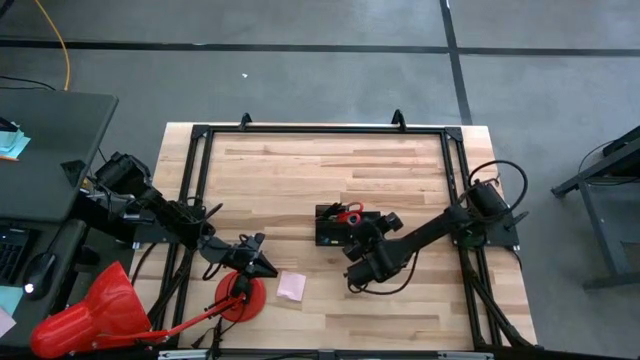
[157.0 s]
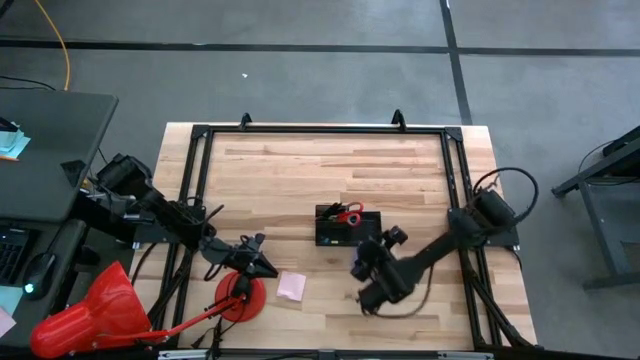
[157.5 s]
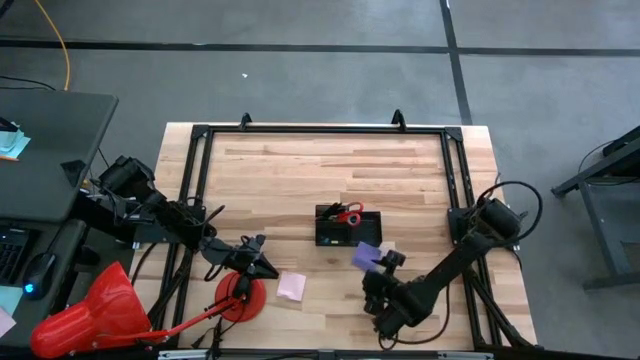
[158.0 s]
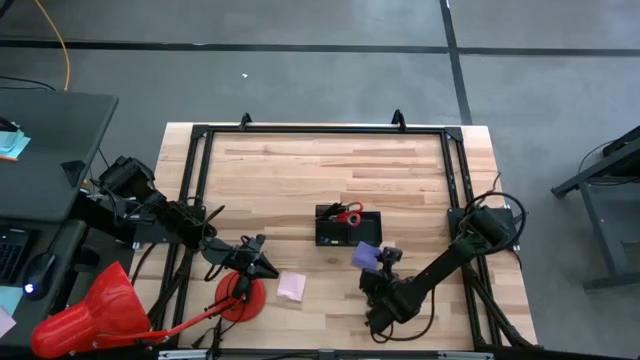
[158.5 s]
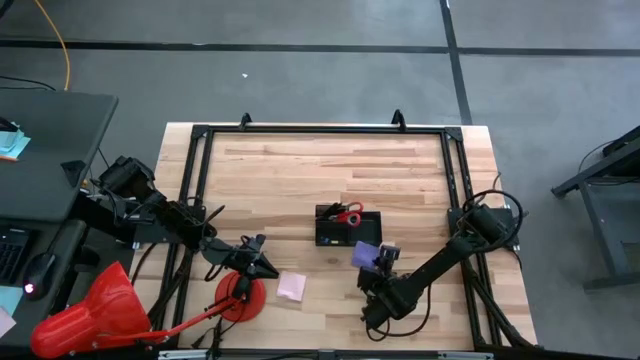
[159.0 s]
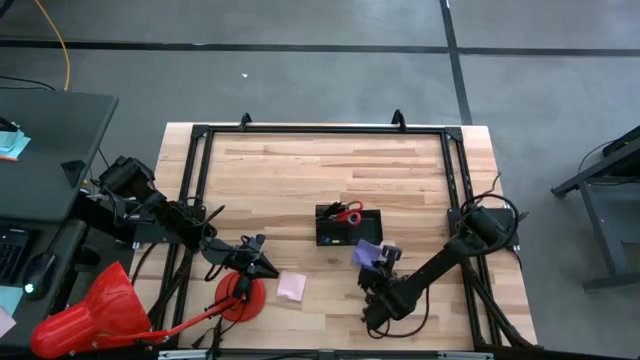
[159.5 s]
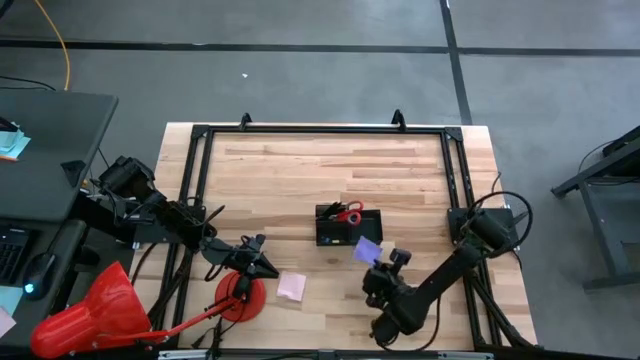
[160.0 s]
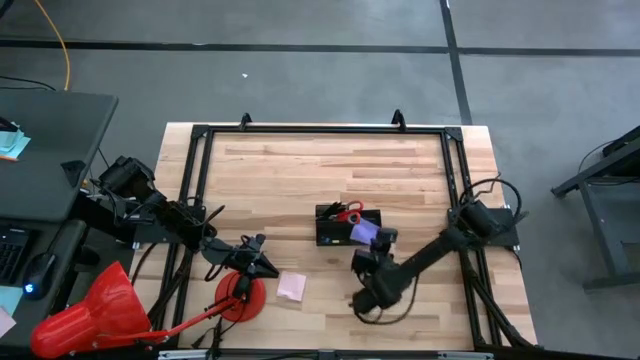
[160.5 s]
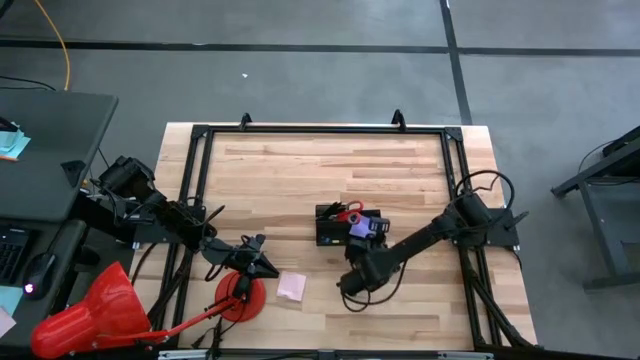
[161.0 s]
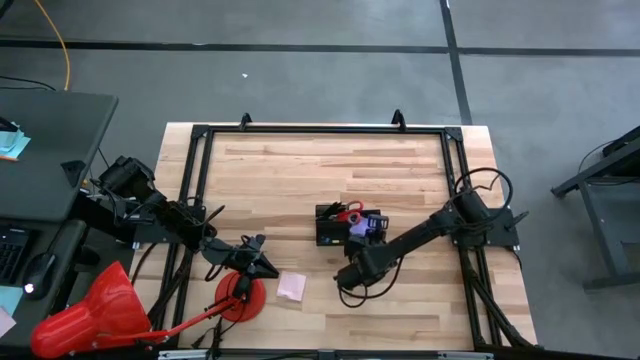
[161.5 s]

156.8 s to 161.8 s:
Task: Pick and place office supplies into organizer
Put the violet sticky note into the black desk organizer

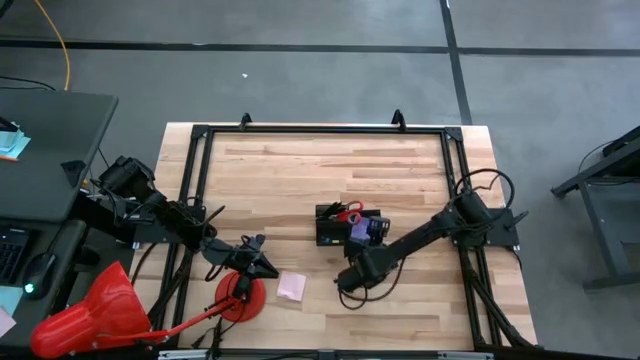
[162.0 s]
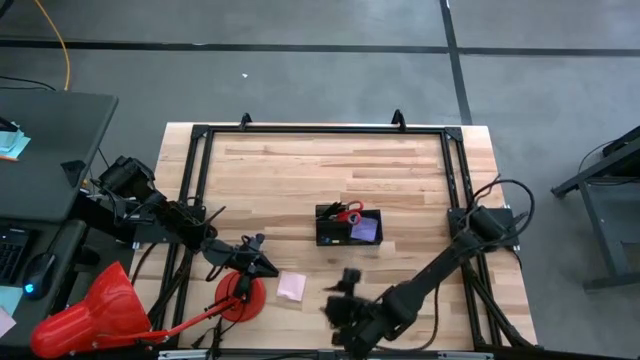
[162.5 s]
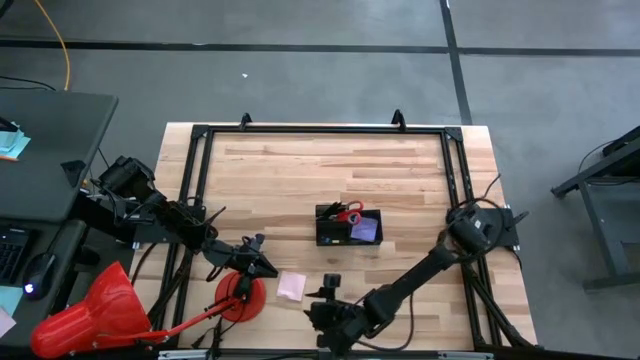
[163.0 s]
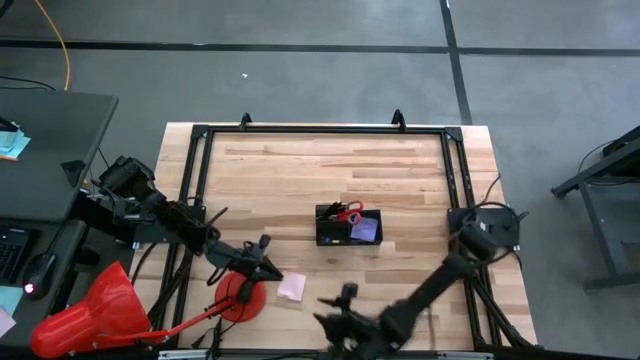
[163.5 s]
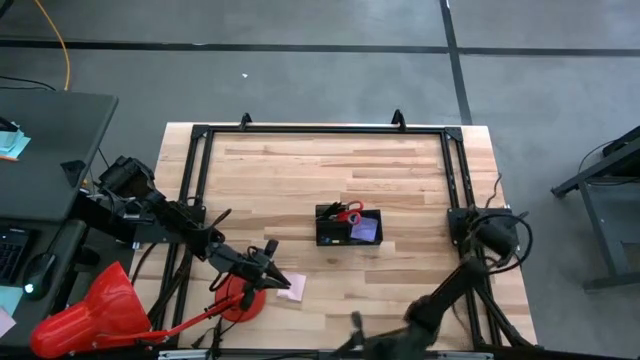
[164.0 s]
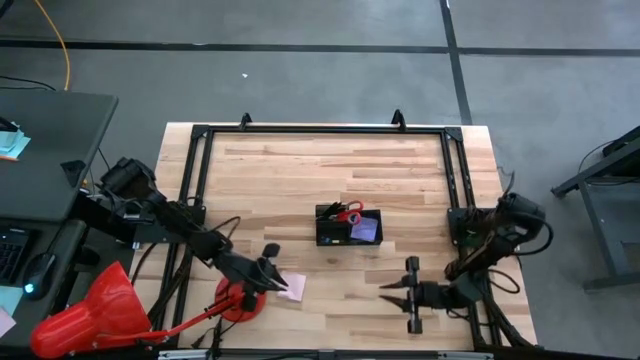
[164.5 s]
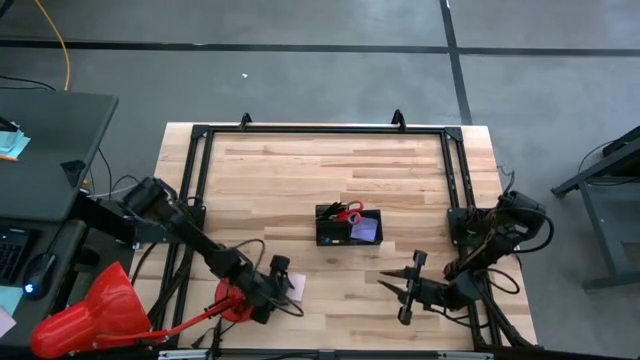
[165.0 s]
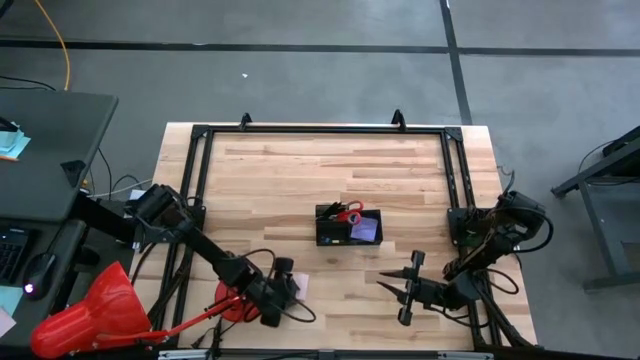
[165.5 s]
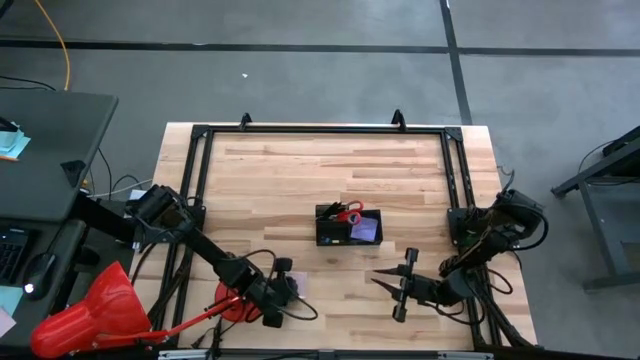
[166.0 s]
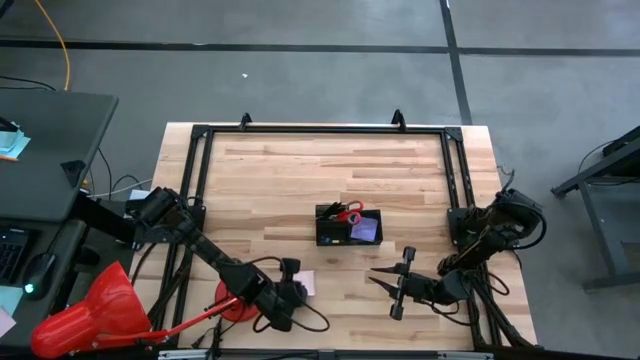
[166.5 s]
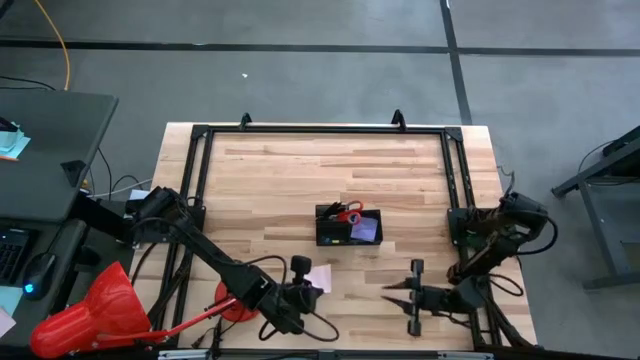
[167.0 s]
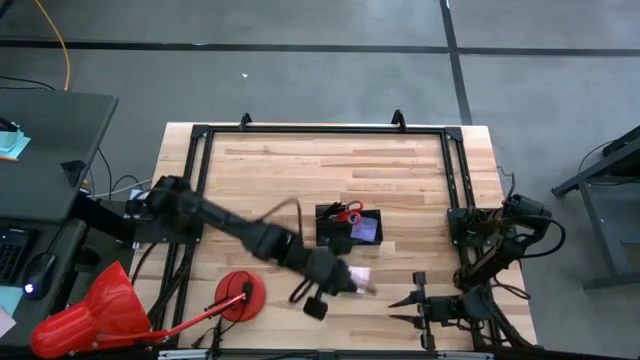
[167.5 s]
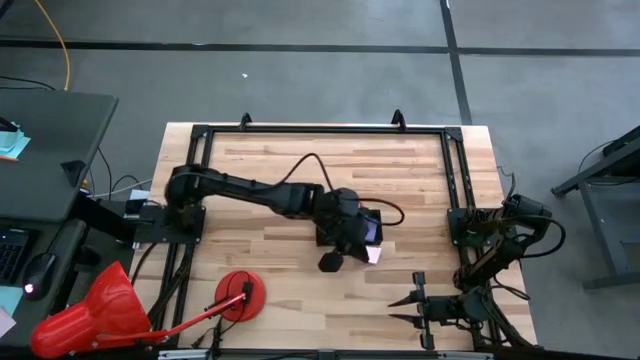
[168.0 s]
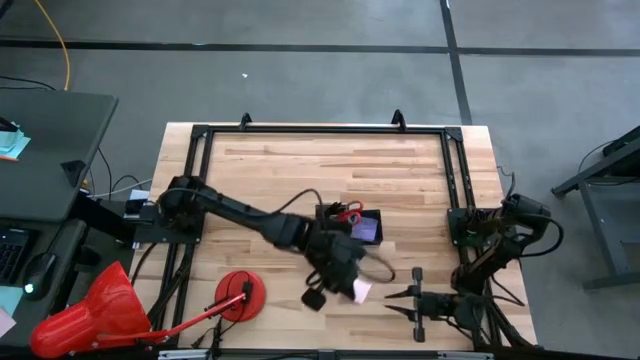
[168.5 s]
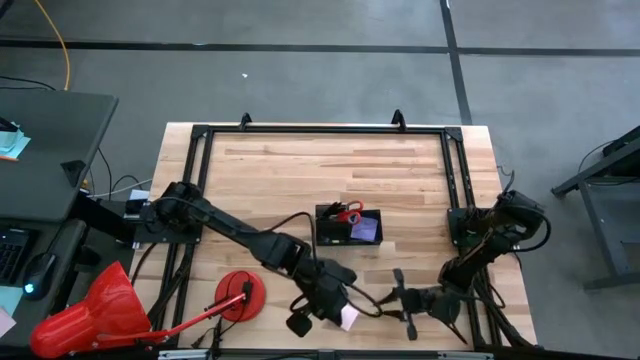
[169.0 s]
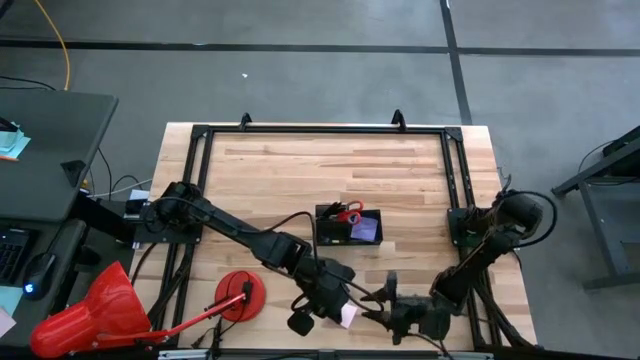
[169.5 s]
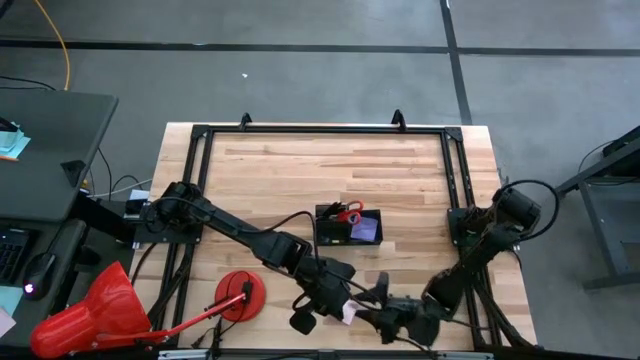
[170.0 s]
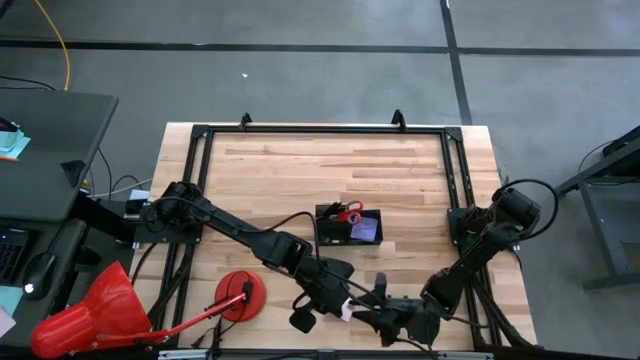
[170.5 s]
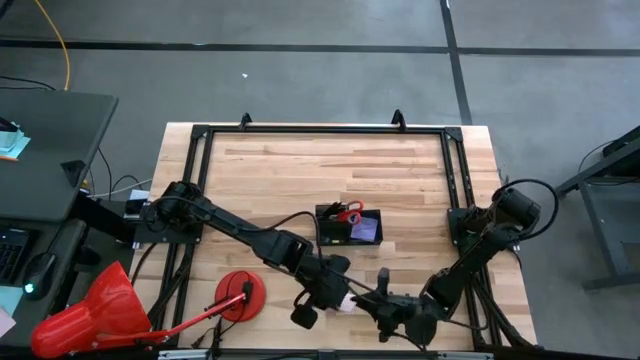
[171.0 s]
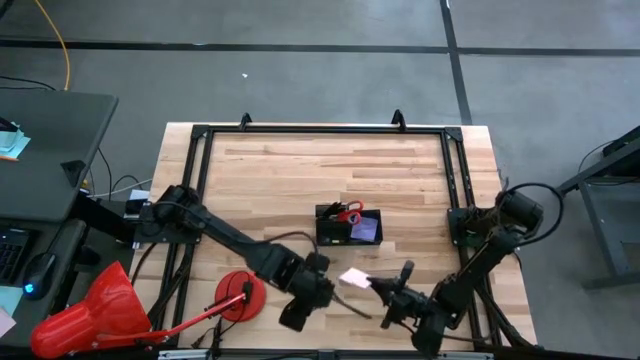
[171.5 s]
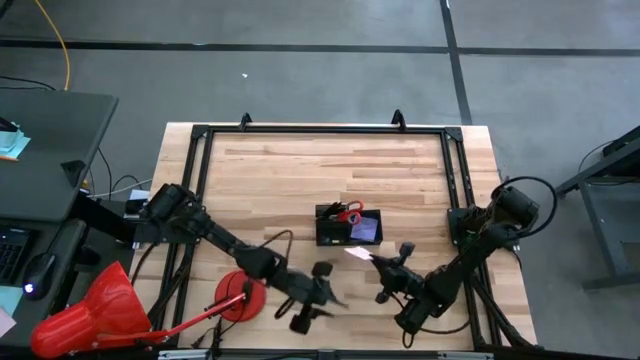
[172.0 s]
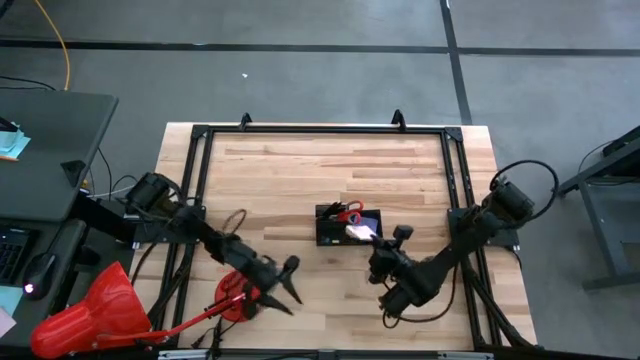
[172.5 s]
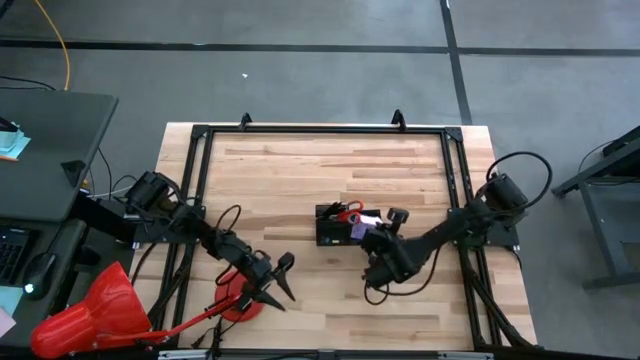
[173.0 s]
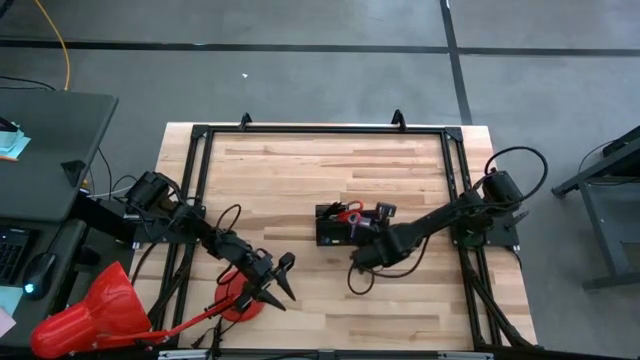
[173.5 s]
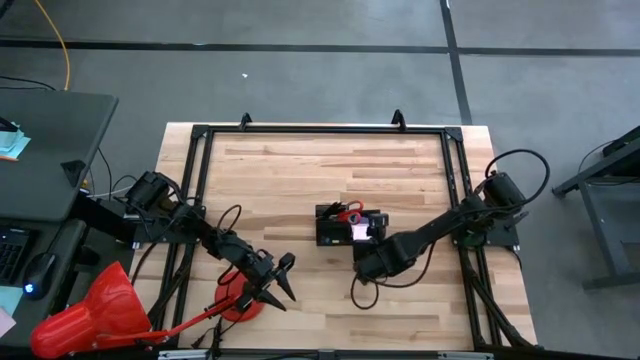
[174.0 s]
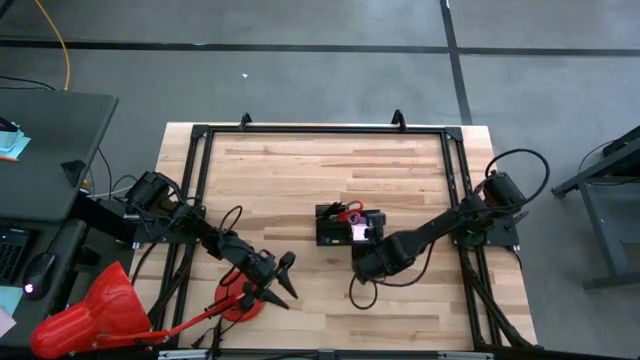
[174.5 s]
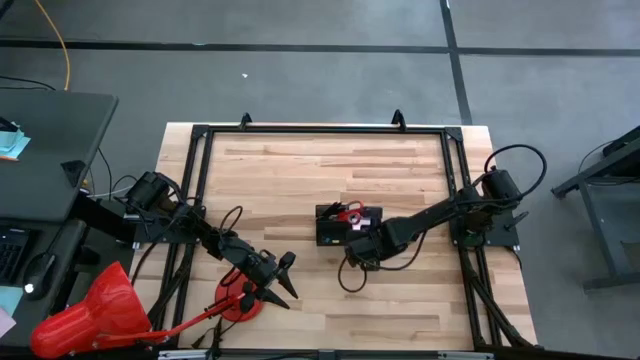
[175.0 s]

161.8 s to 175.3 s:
Put the pink sticky notes into the black desk organizer

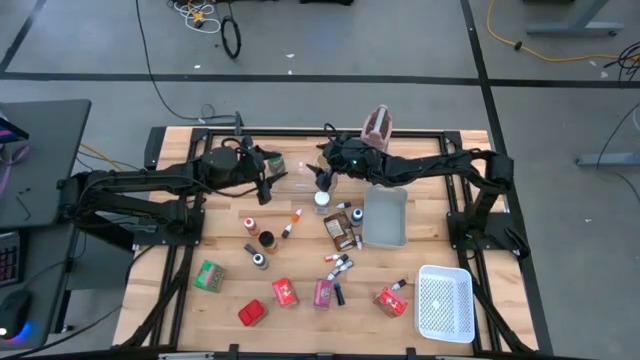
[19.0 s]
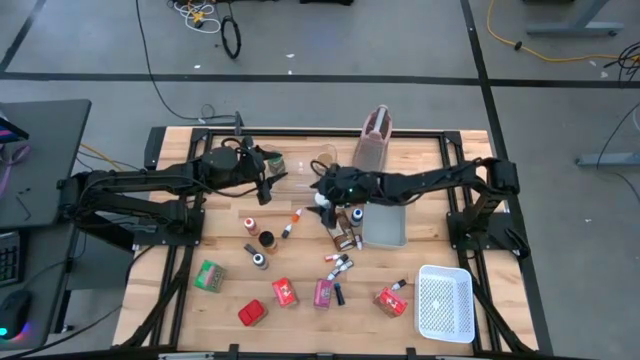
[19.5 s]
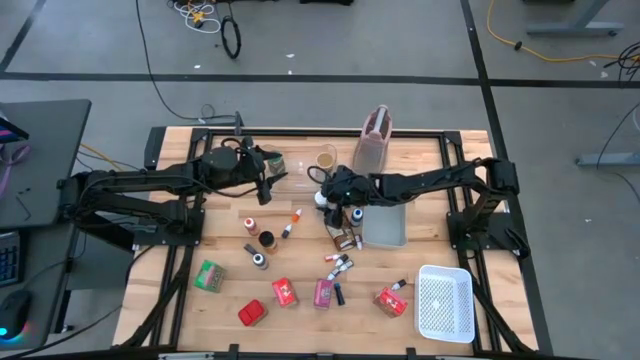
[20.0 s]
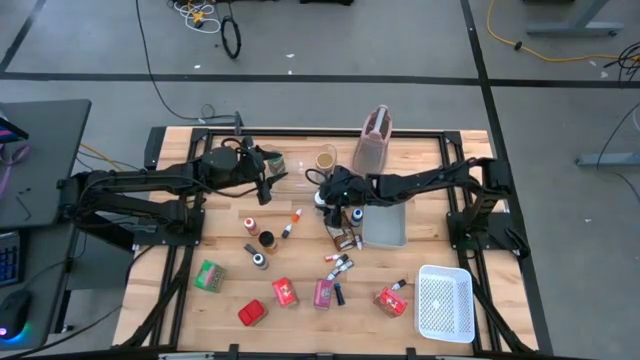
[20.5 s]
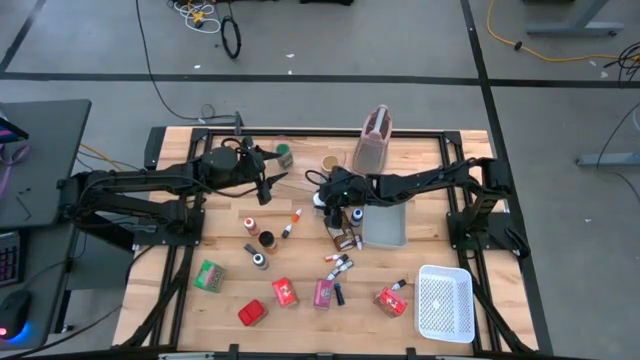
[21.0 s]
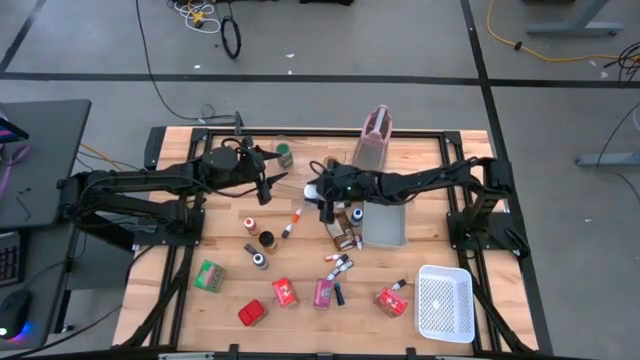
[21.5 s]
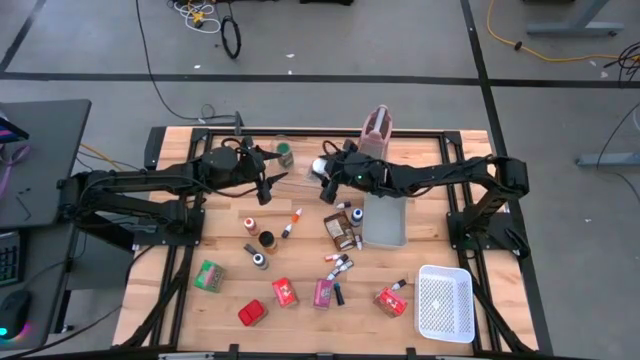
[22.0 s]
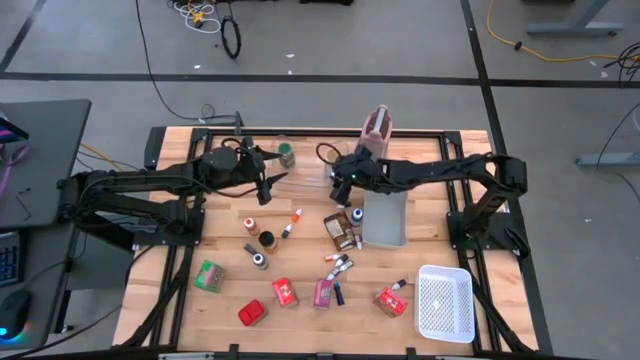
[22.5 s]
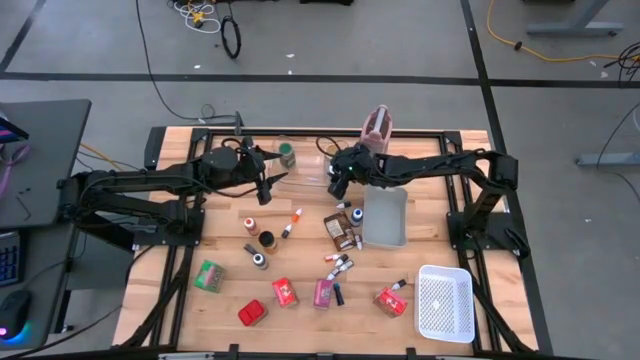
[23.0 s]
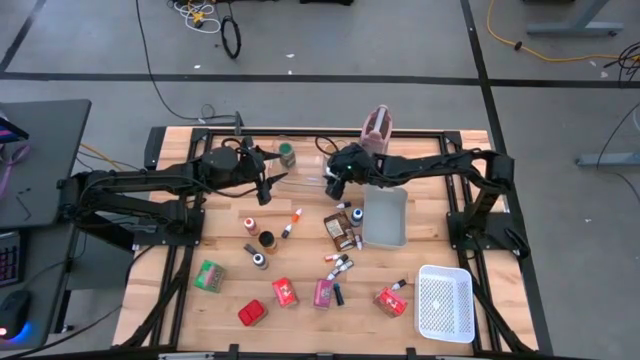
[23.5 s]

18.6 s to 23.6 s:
Task: Pick & Place Kitchen Items
Put the white seasoning bottle into the transparent bin
